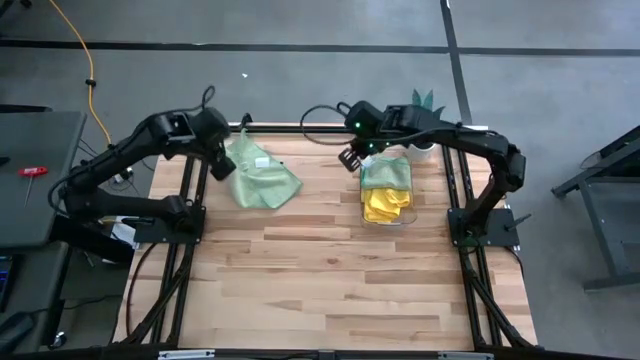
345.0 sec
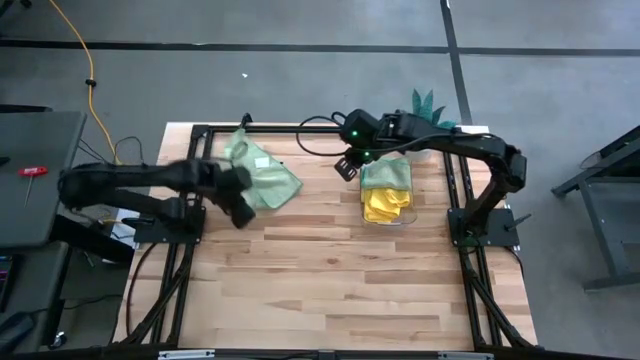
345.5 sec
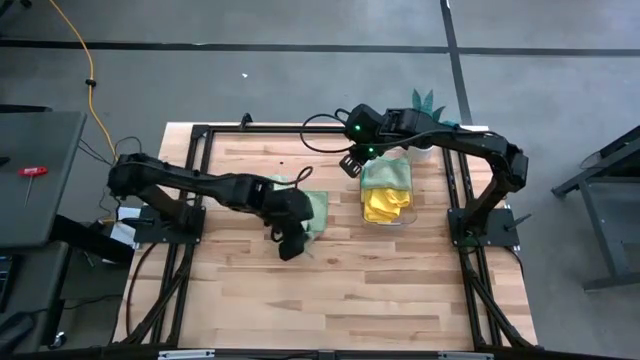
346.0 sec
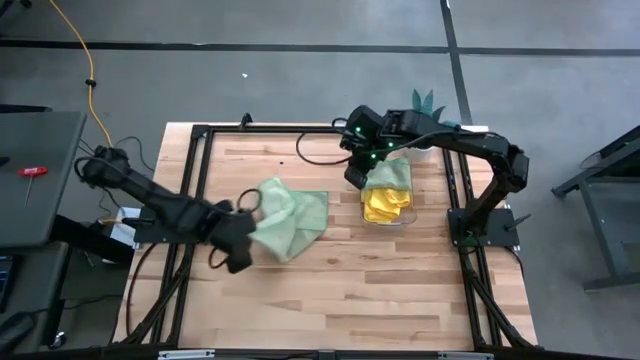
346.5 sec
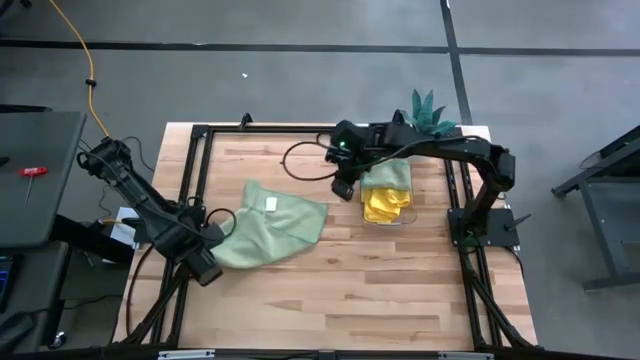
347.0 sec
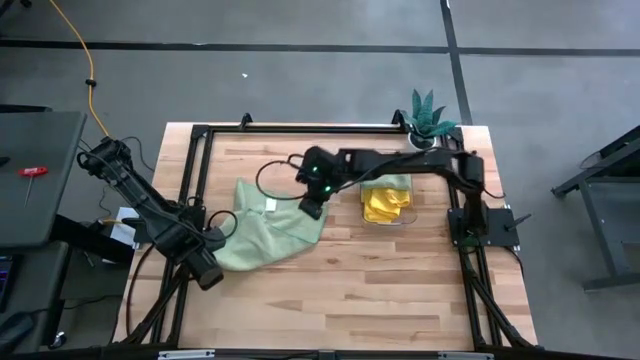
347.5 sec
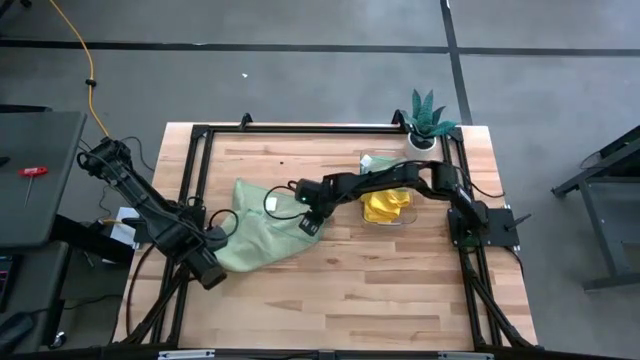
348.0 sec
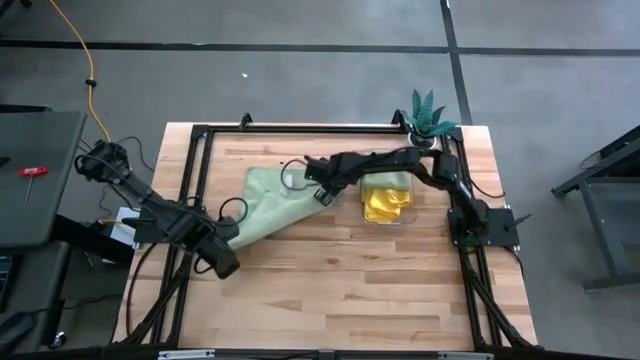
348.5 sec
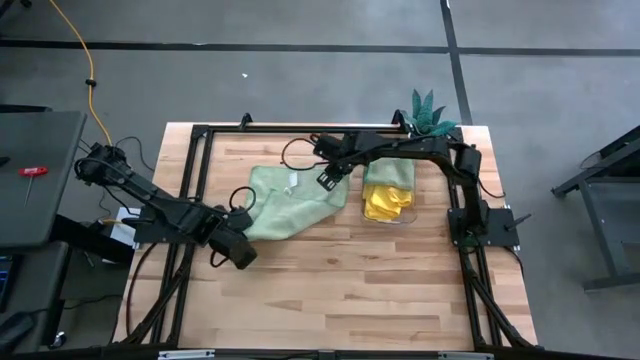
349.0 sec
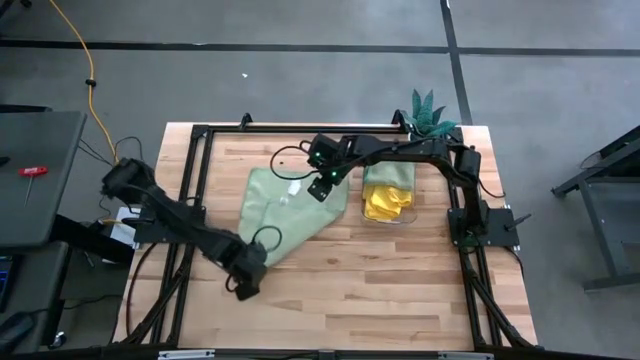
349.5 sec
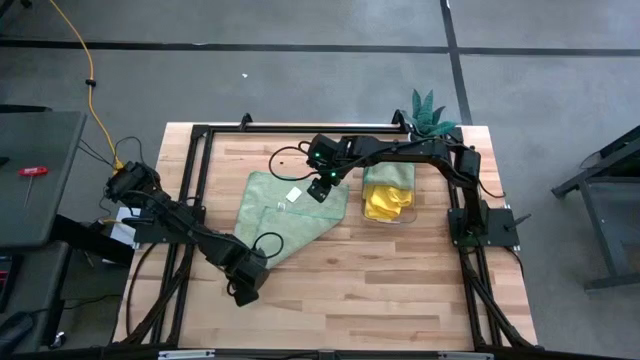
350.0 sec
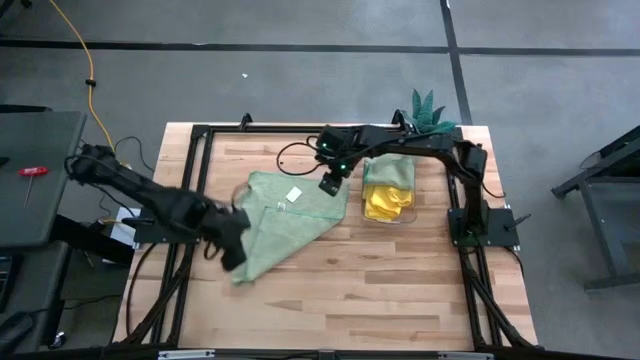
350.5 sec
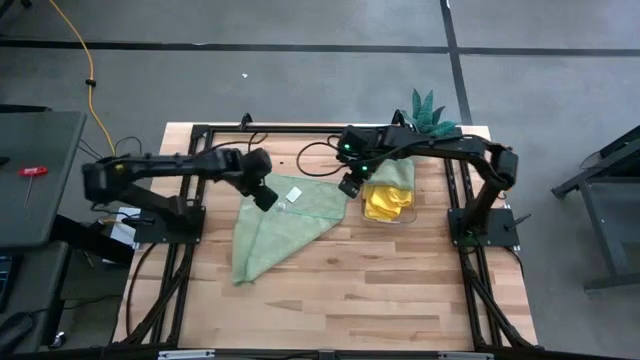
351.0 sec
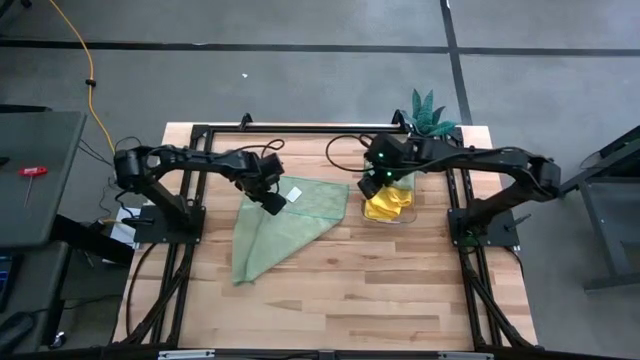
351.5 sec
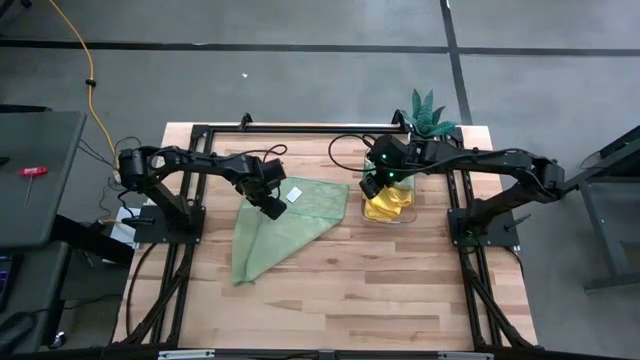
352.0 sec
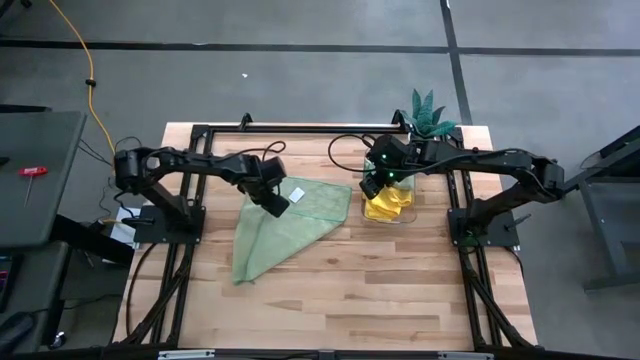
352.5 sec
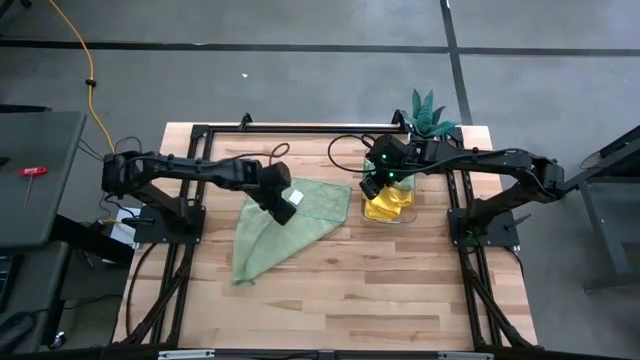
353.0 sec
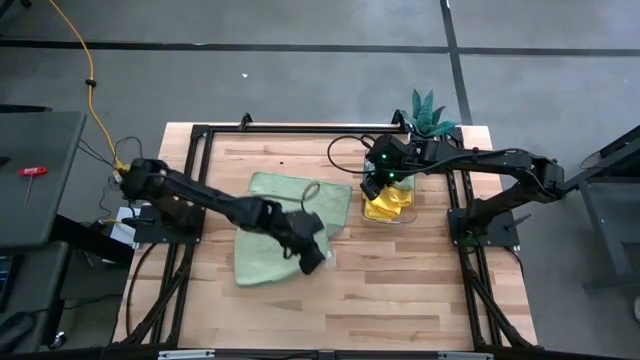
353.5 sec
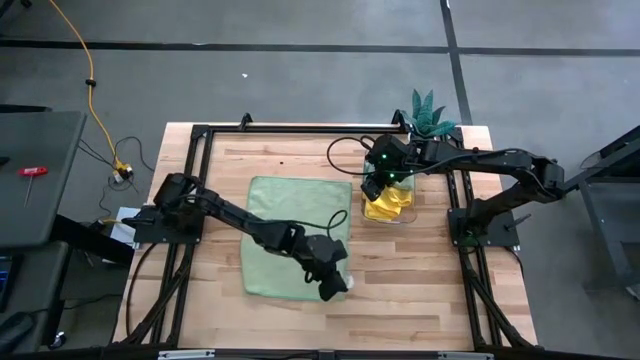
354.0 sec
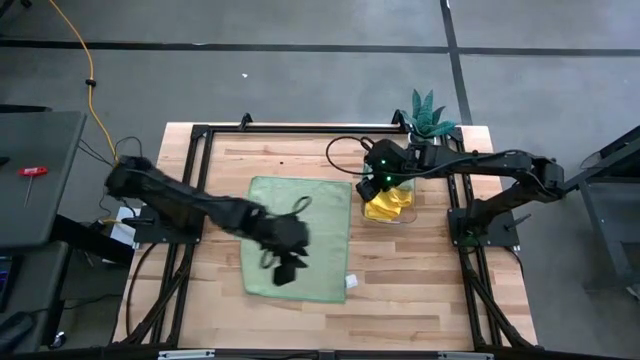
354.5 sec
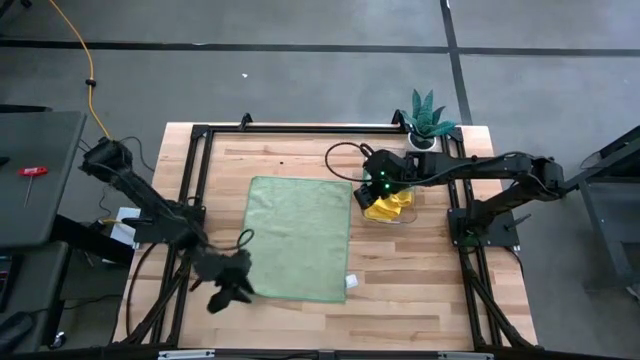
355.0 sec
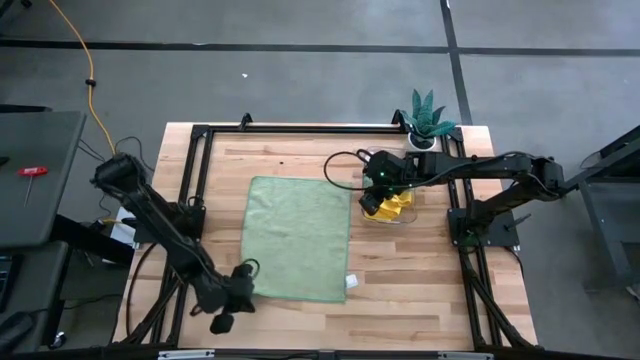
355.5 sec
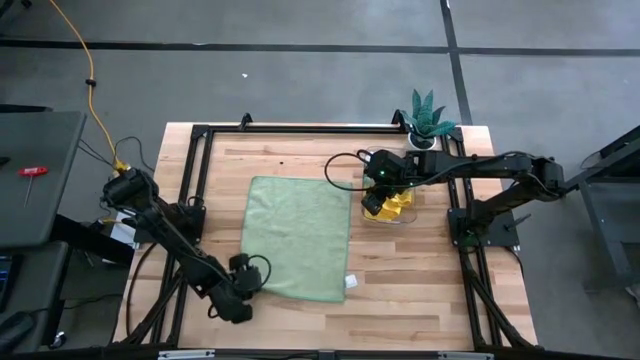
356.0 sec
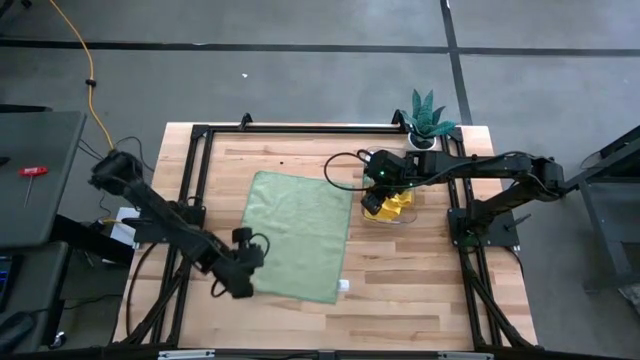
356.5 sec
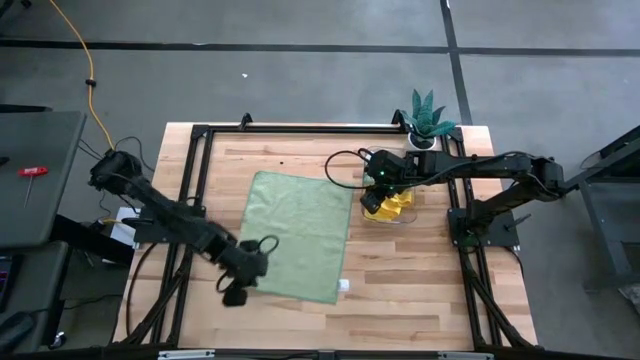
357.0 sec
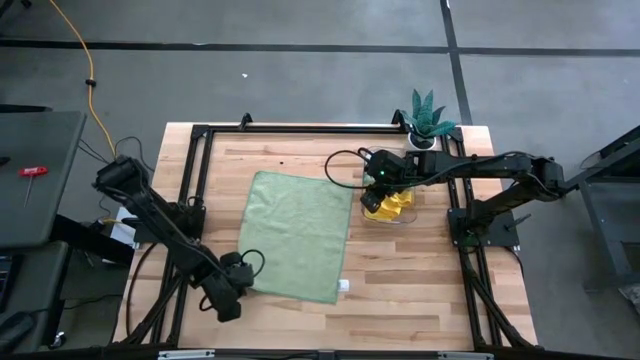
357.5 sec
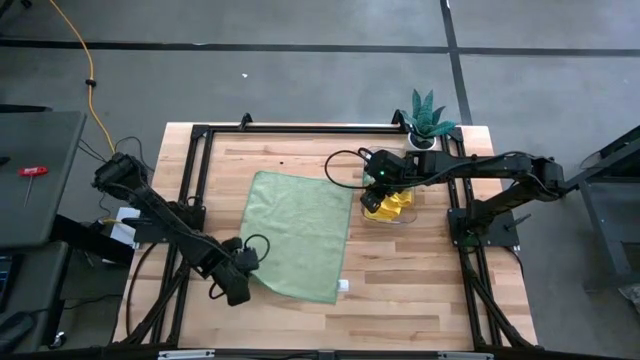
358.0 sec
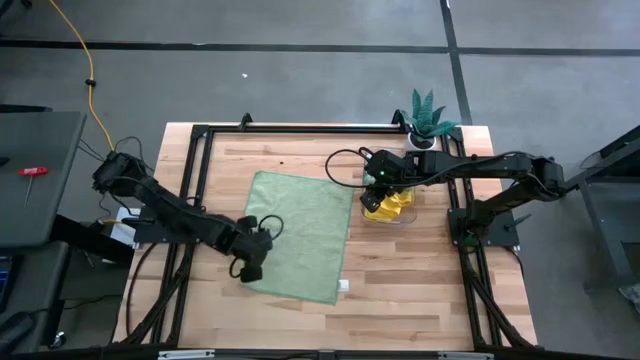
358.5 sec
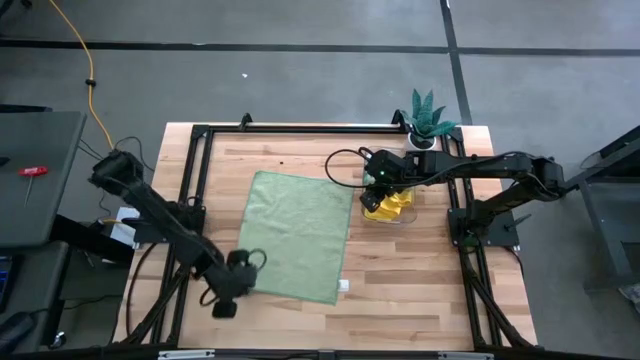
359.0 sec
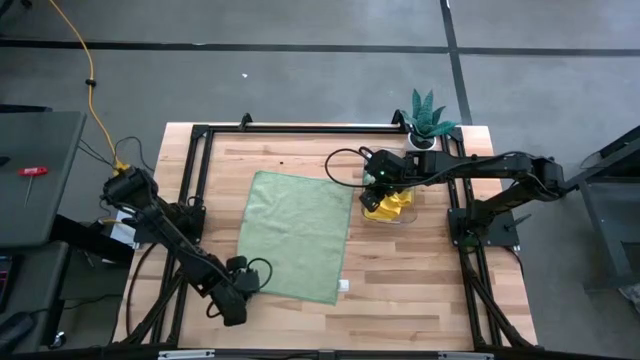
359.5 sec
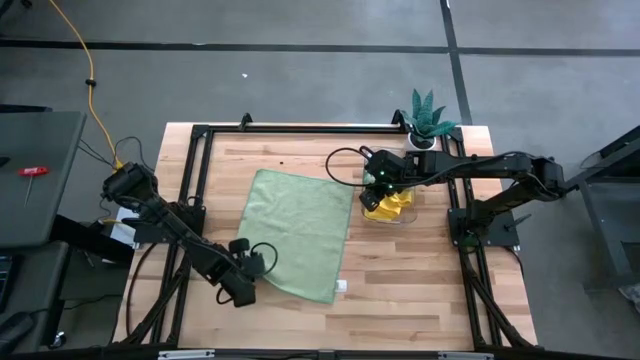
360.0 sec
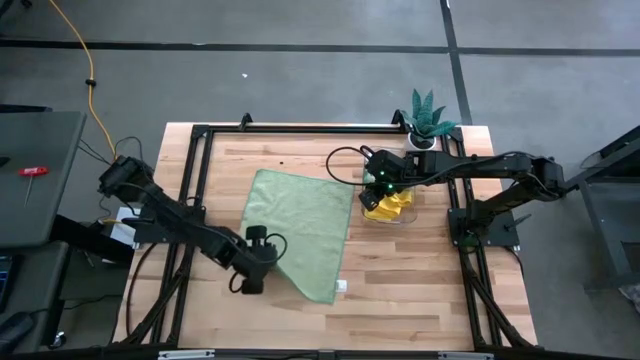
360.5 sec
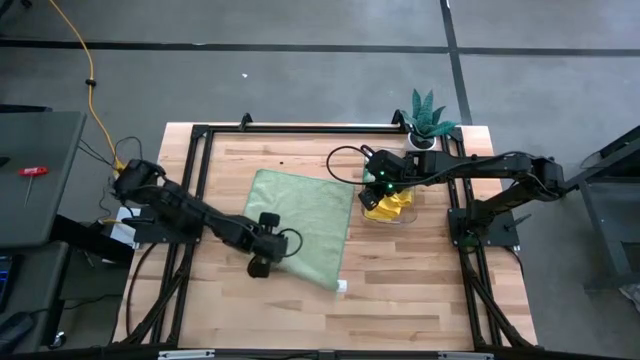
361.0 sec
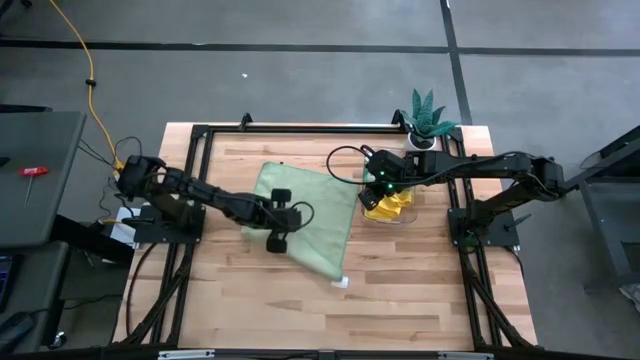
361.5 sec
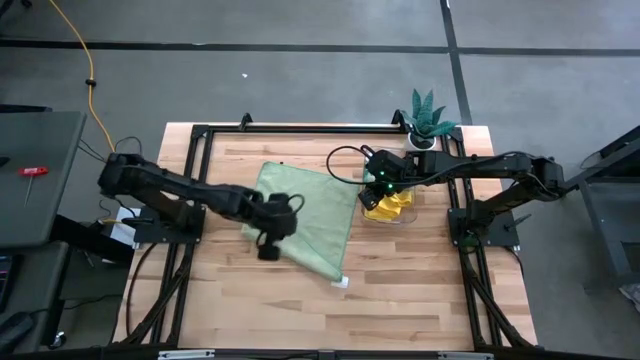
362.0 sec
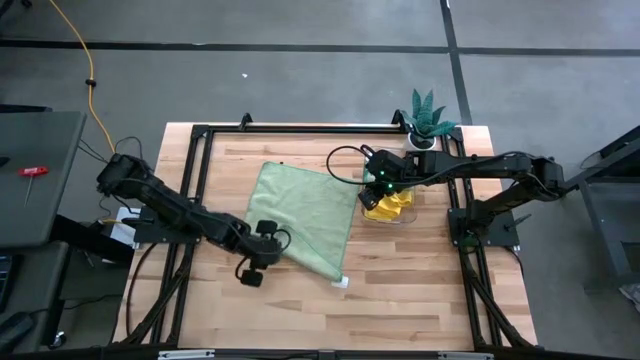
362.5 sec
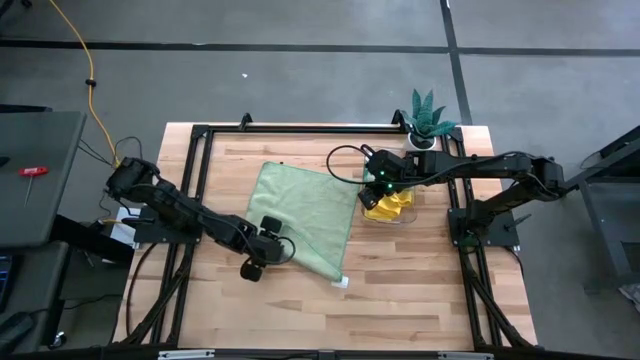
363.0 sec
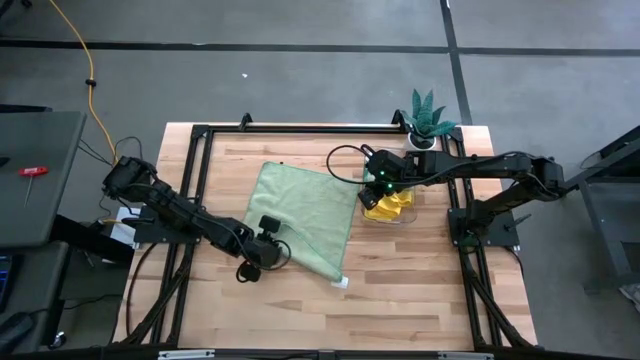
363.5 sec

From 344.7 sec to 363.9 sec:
Task: Fold microfiber towels
Fold the green microfiber towel

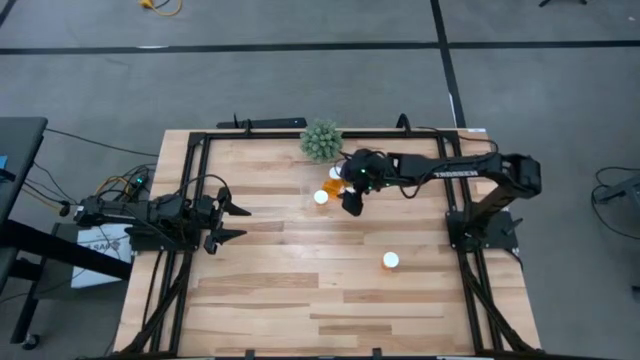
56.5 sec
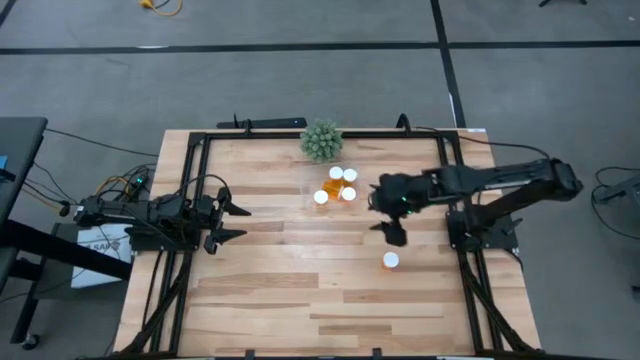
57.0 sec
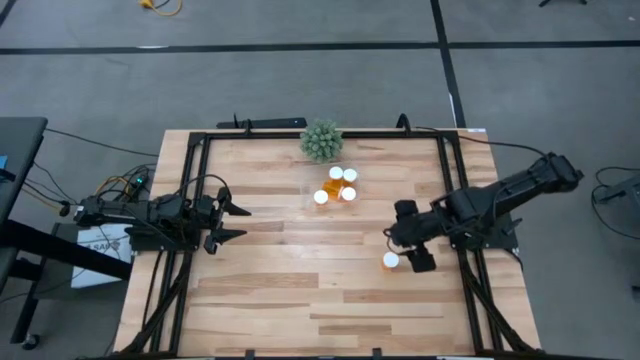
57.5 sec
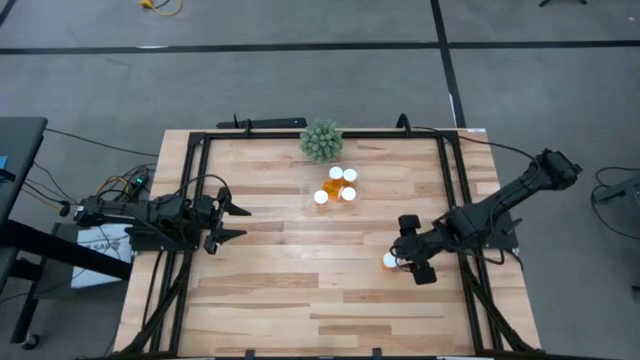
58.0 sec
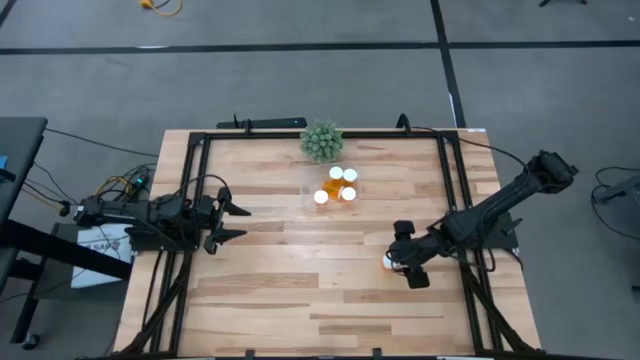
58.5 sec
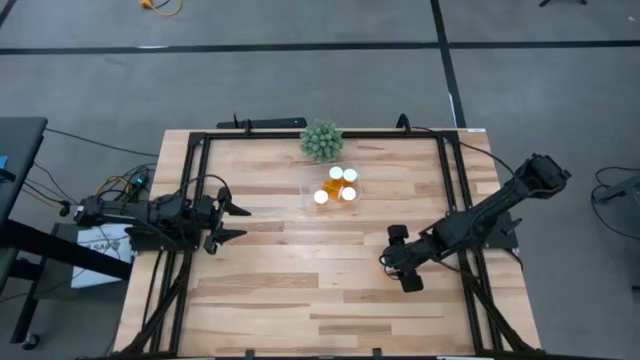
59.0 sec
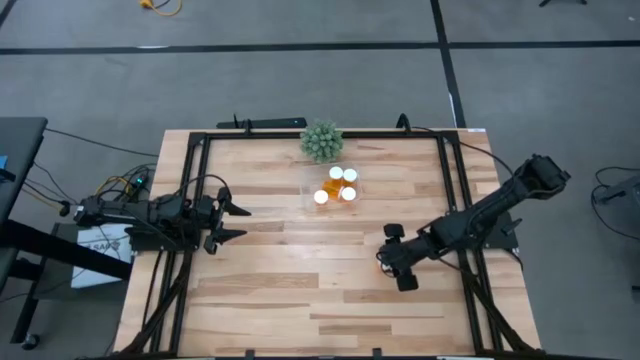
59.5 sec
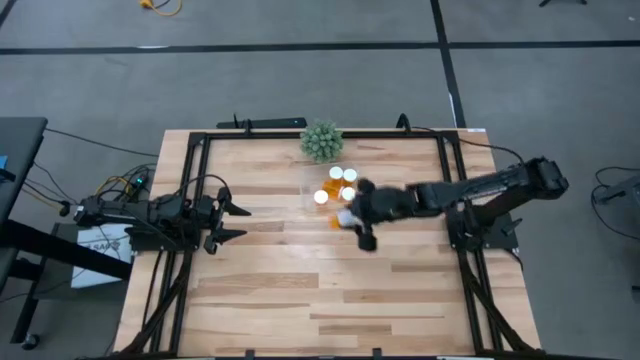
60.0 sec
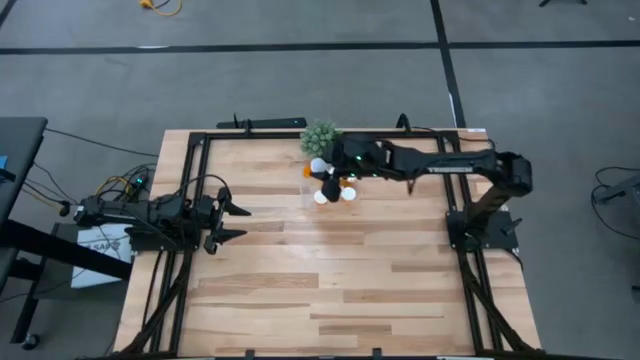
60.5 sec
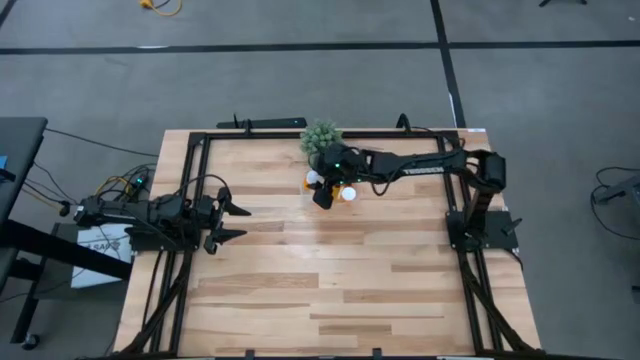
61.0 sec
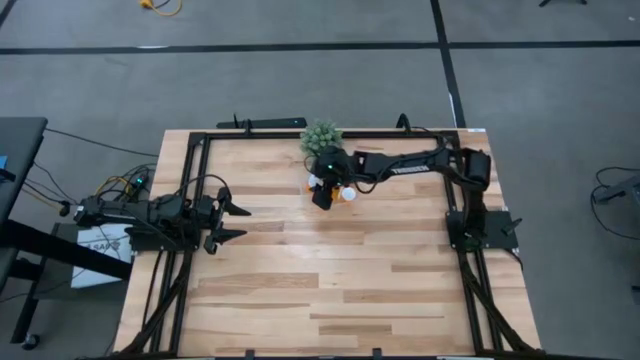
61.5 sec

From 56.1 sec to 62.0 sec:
Task: Pick and place pill bottles into a basket
Put the orange pill bottle into the transparent bin
